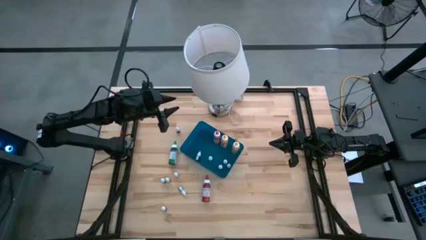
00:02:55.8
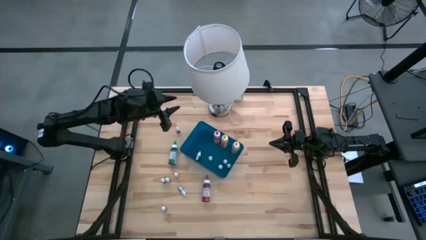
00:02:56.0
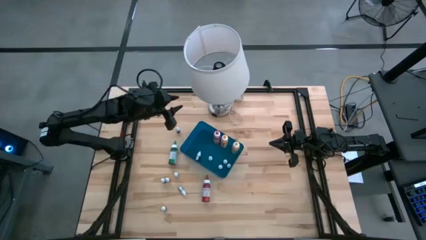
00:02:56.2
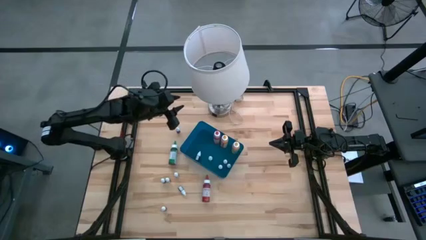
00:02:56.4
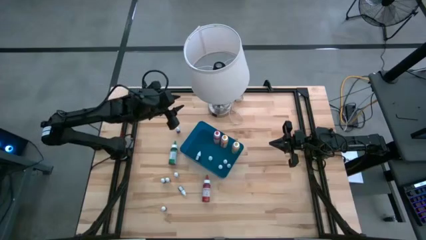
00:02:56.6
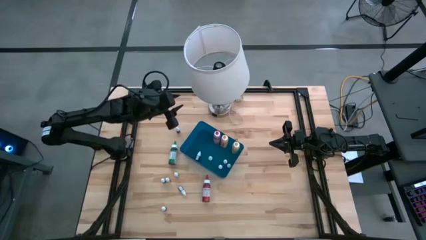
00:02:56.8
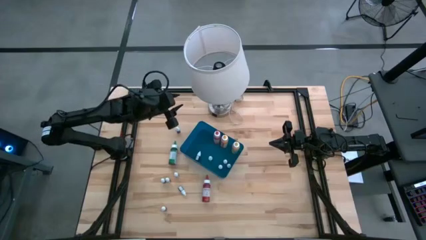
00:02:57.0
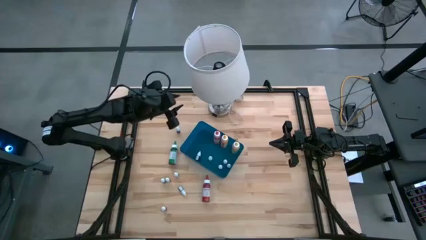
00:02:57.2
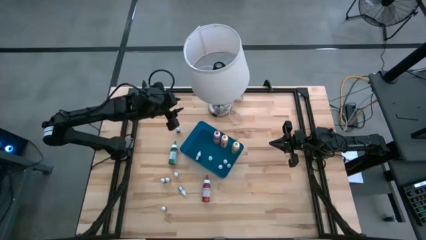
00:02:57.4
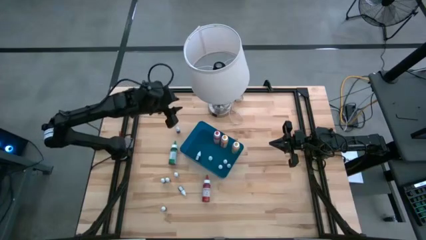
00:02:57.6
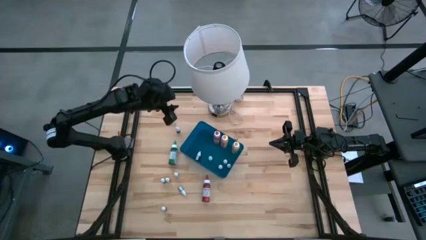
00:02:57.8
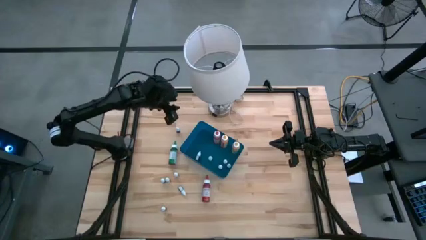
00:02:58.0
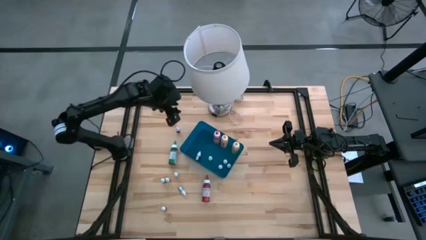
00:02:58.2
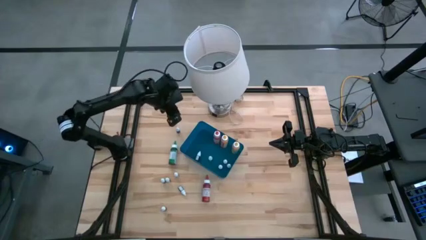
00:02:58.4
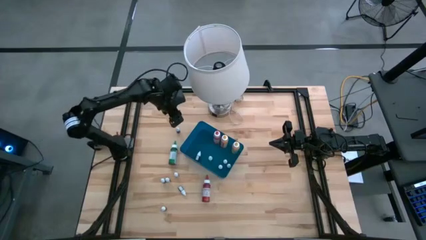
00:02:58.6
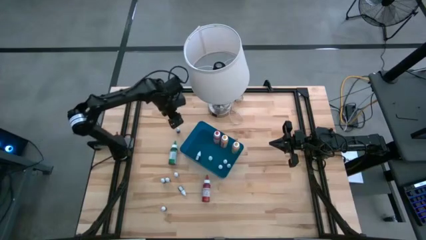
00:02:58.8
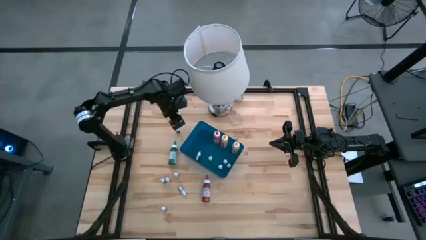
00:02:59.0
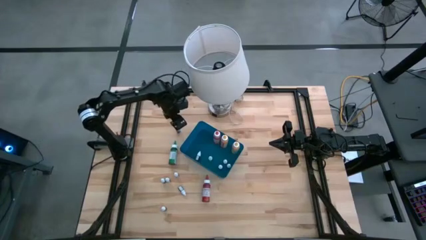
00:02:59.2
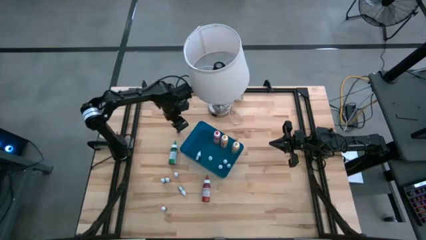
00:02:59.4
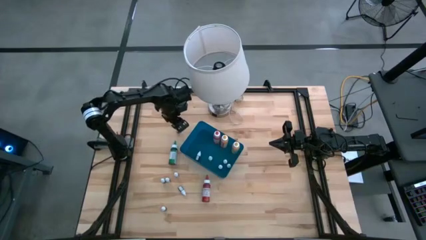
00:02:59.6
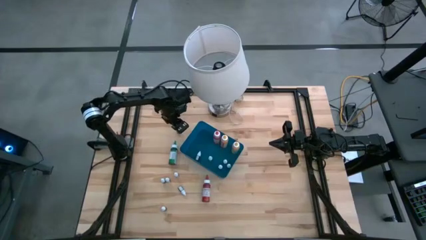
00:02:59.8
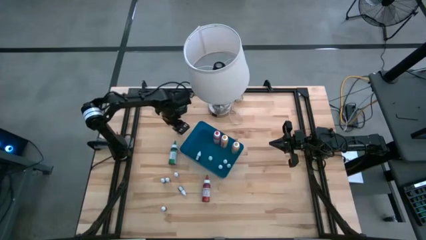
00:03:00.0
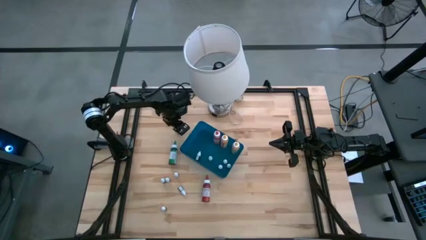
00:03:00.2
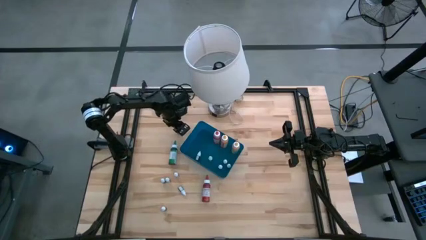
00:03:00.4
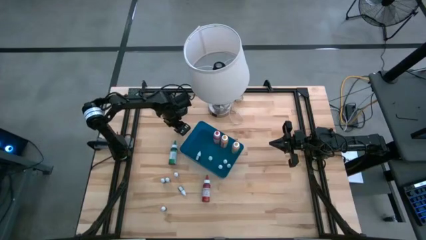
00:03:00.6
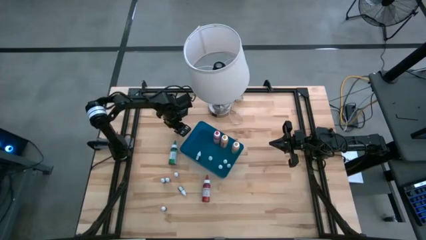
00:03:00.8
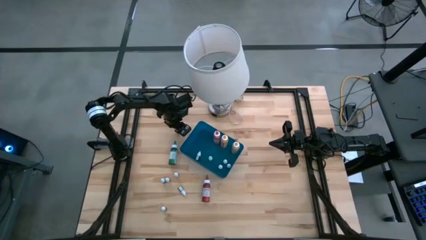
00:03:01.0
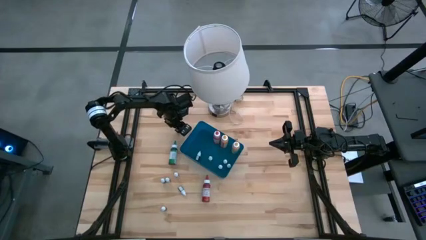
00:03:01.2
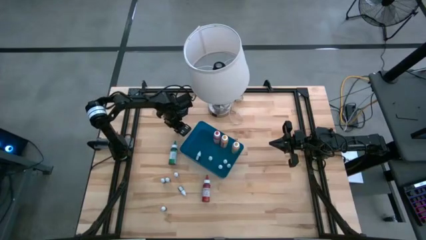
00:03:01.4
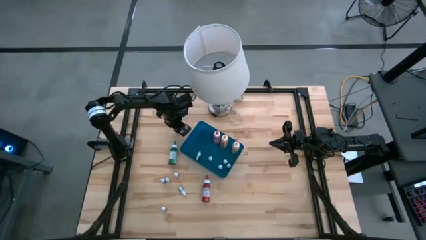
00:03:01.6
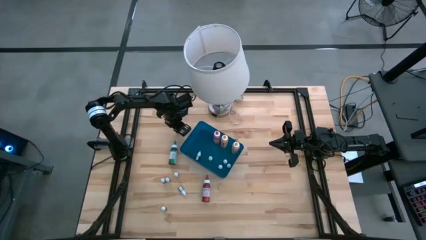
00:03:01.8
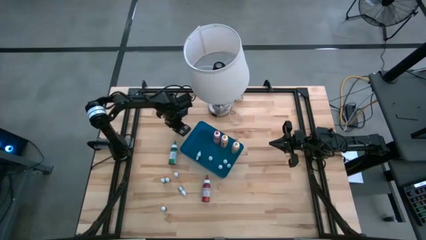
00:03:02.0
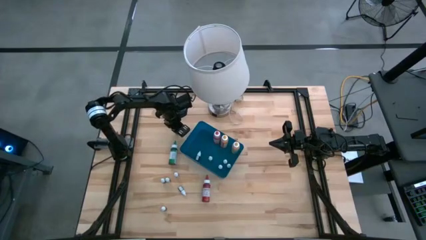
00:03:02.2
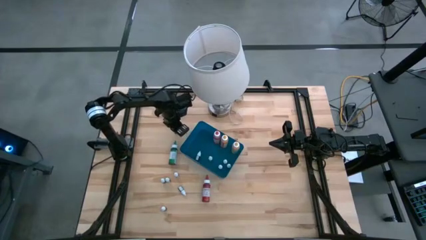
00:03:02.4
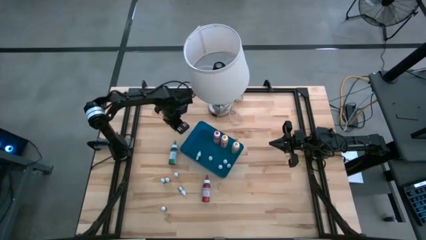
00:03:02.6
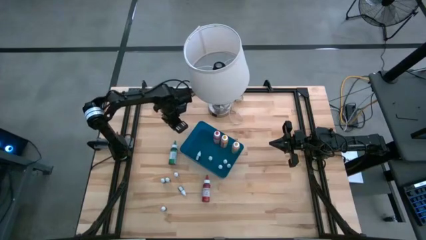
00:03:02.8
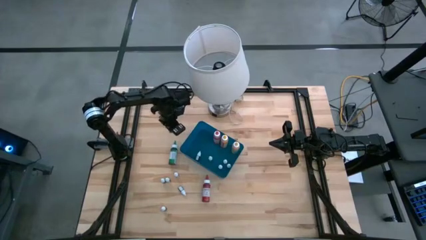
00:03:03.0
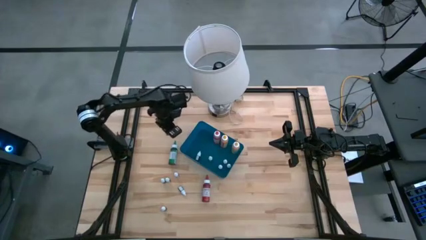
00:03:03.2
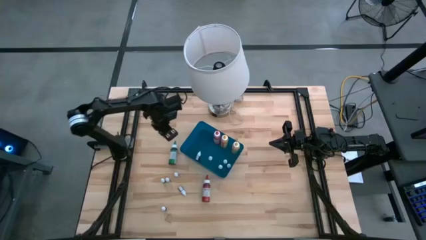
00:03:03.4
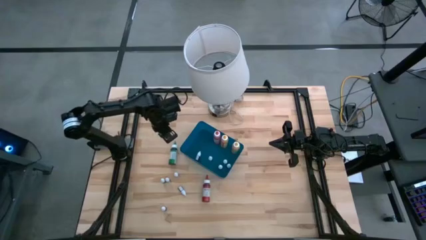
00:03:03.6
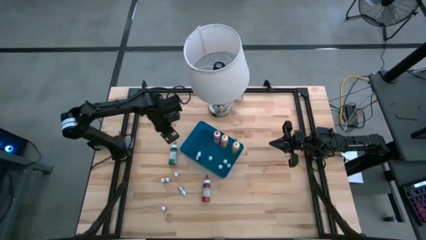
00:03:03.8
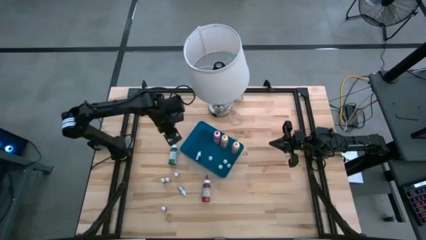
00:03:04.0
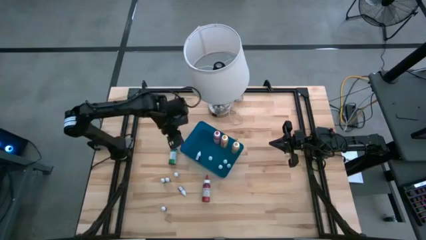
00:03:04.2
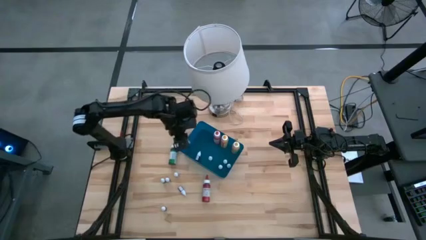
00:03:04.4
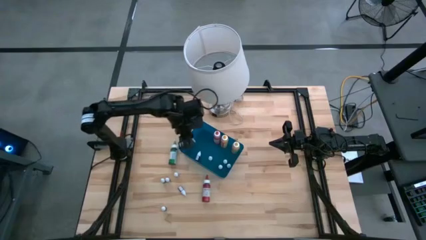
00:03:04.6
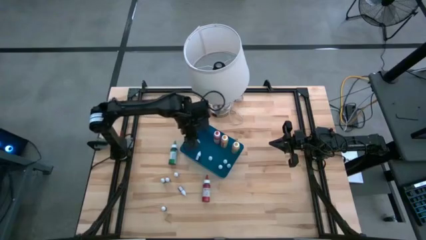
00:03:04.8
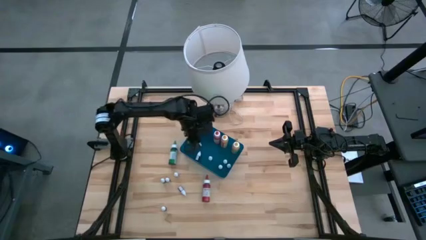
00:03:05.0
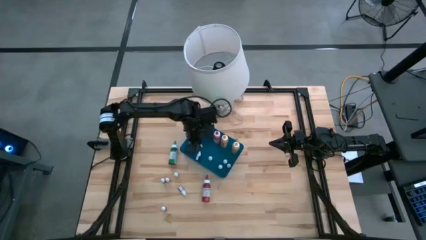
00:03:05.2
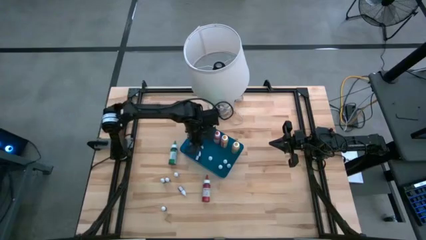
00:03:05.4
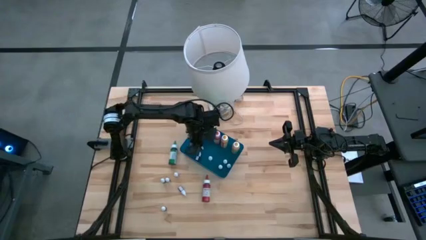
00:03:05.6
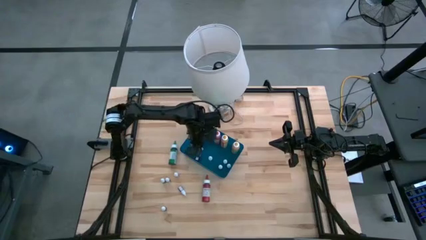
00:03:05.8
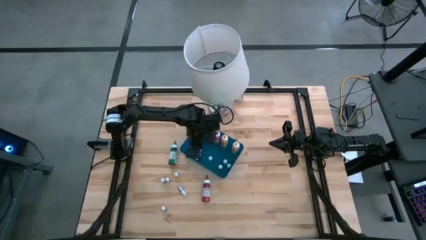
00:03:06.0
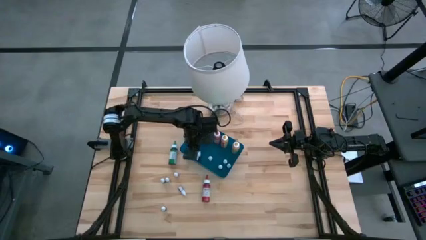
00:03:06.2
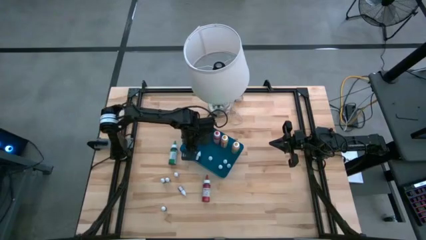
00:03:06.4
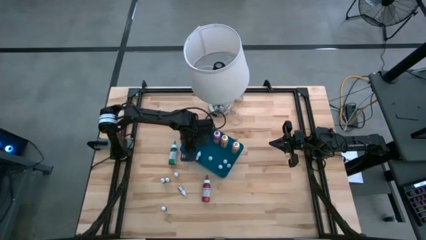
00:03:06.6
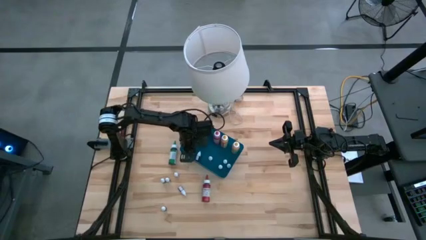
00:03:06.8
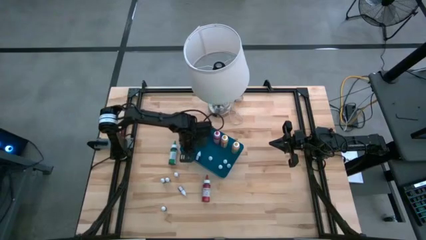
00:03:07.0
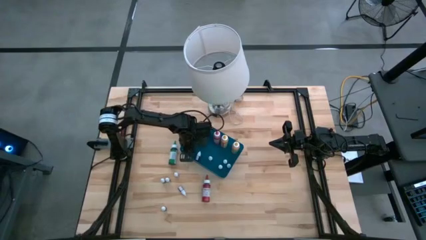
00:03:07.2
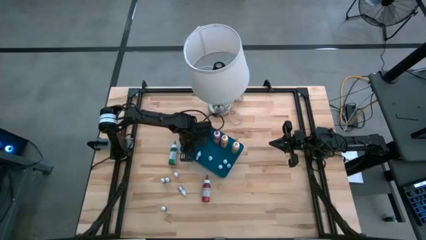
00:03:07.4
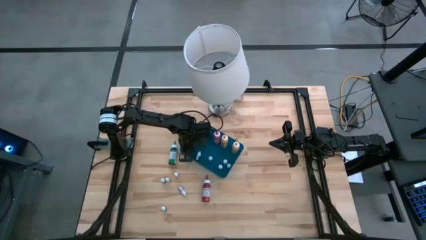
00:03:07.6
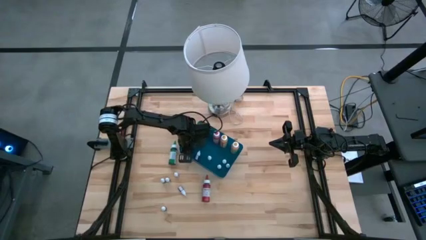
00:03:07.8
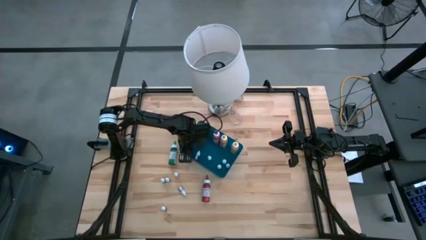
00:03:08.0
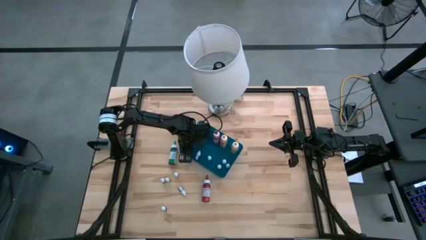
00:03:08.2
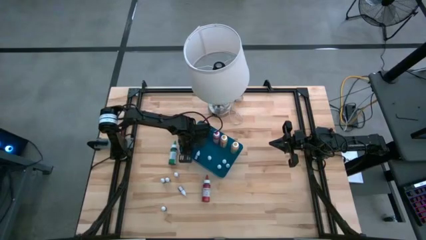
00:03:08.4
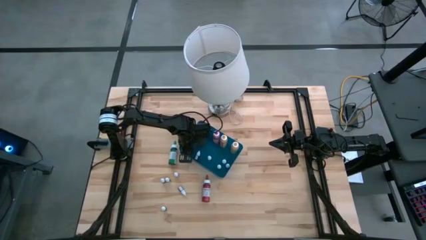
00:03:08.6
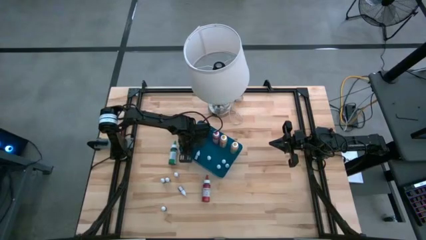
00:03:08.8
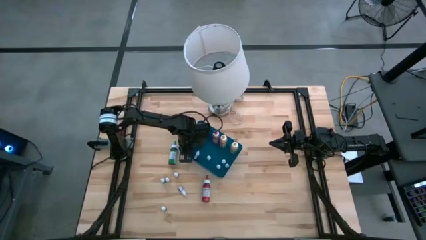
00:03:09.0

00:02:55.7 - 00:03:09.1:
Task: Pick & Place food coloring
Put the small black food coloring bottle into the blue container
